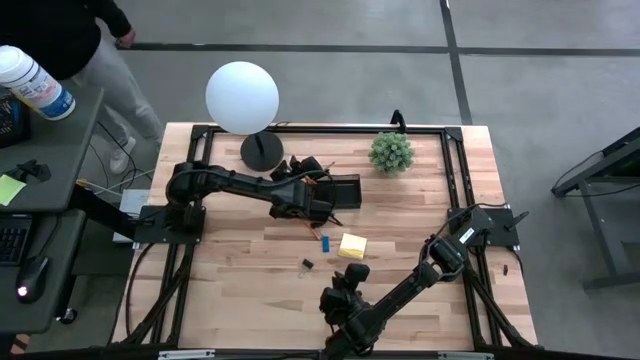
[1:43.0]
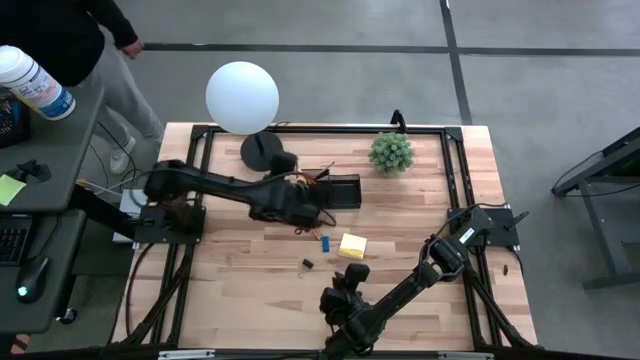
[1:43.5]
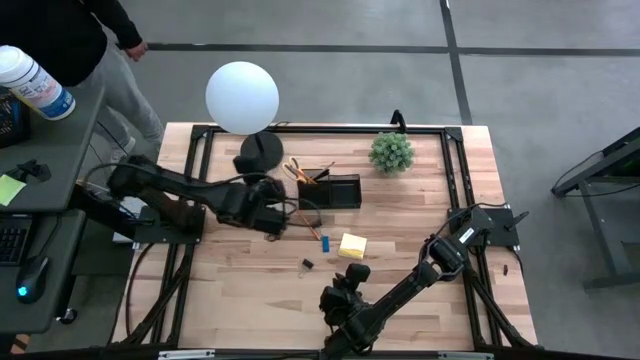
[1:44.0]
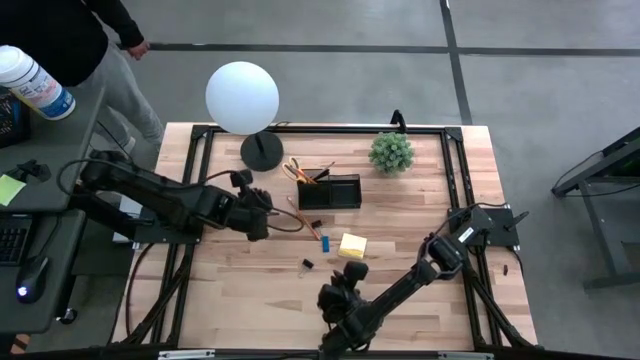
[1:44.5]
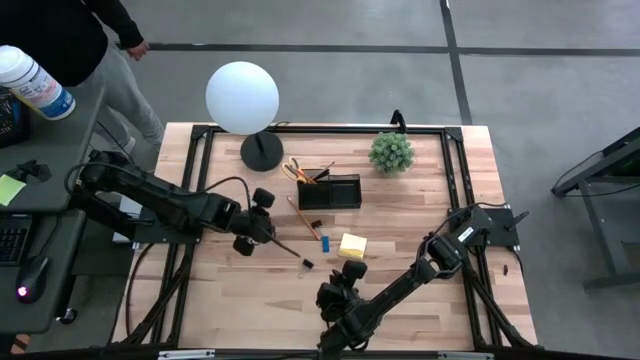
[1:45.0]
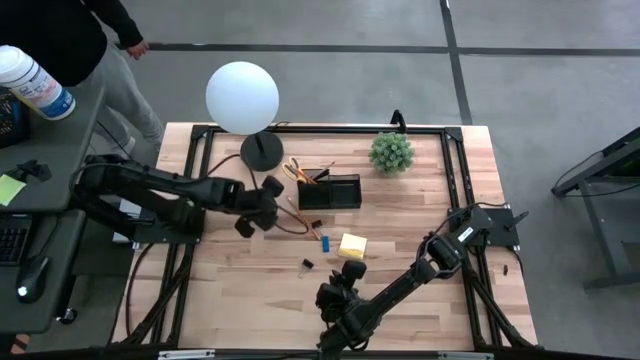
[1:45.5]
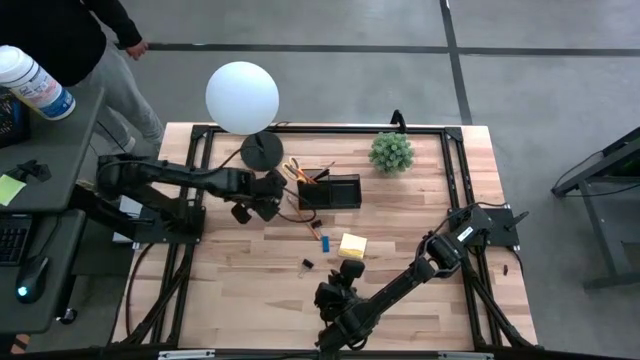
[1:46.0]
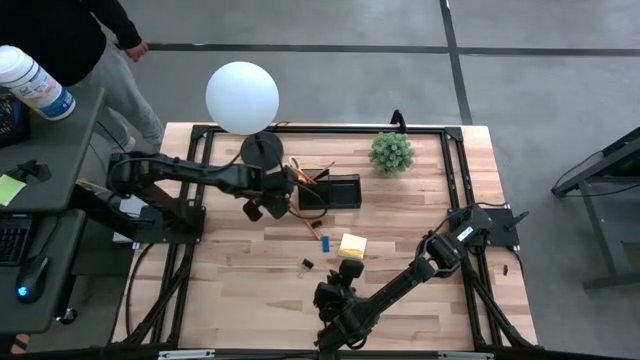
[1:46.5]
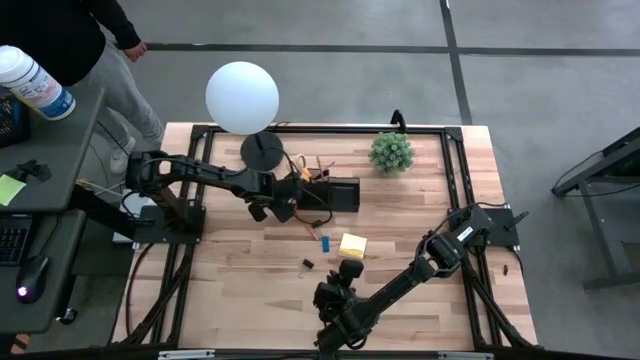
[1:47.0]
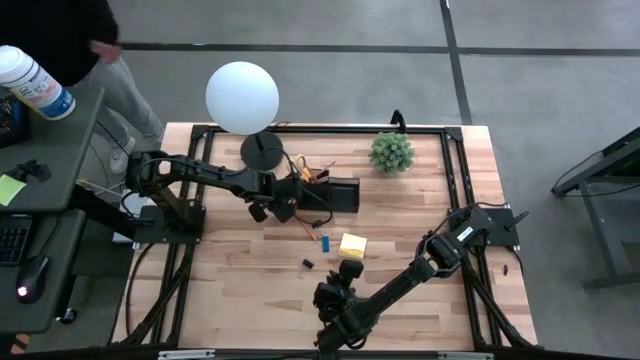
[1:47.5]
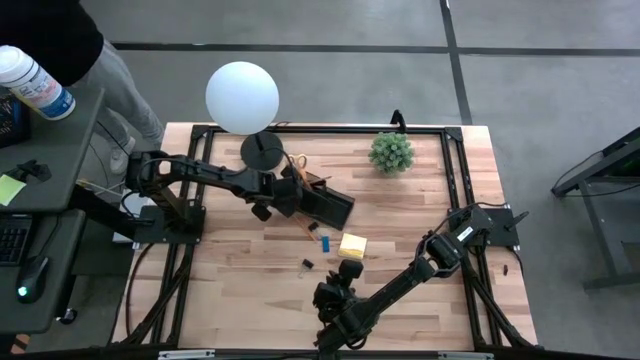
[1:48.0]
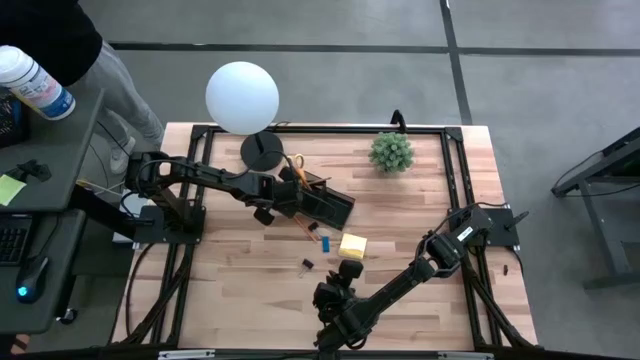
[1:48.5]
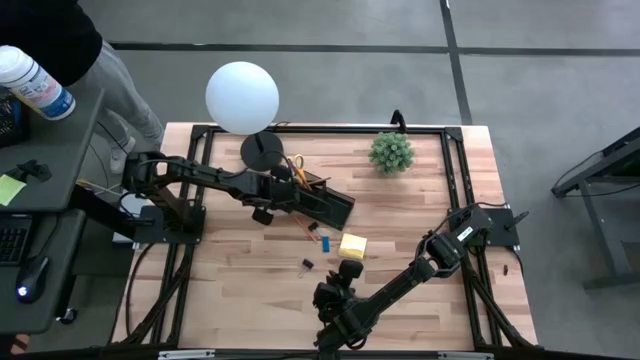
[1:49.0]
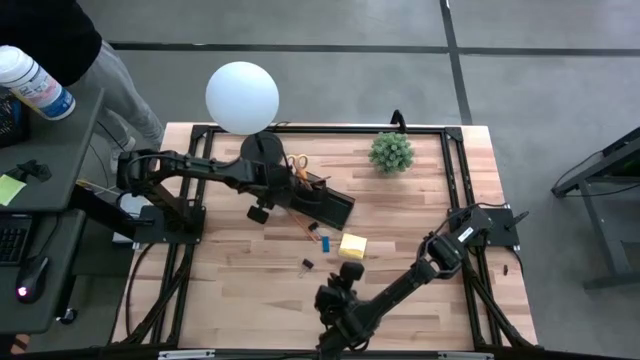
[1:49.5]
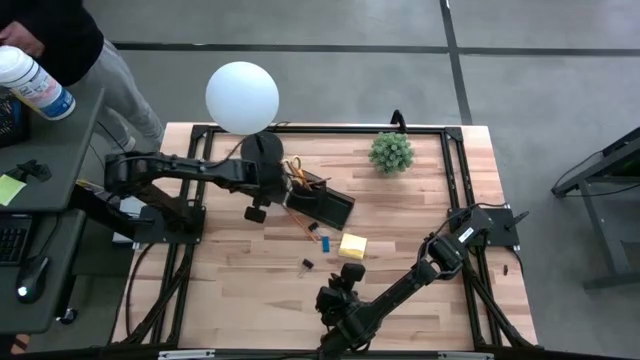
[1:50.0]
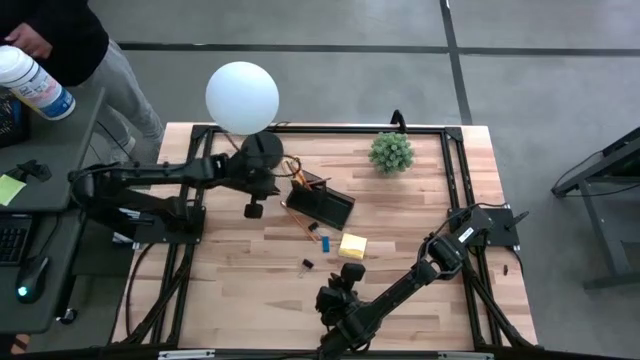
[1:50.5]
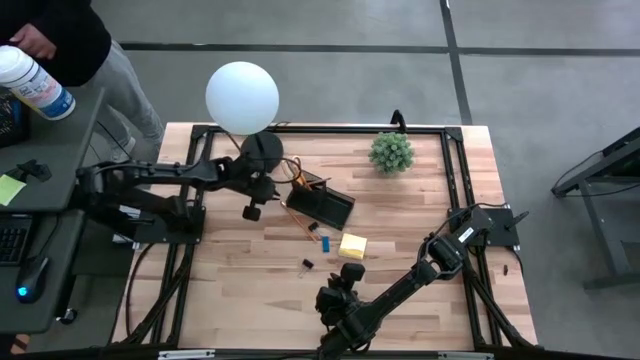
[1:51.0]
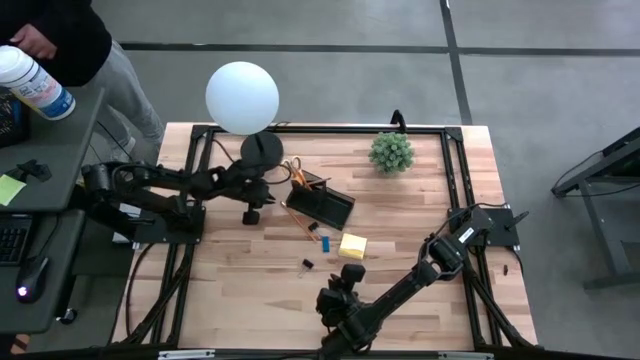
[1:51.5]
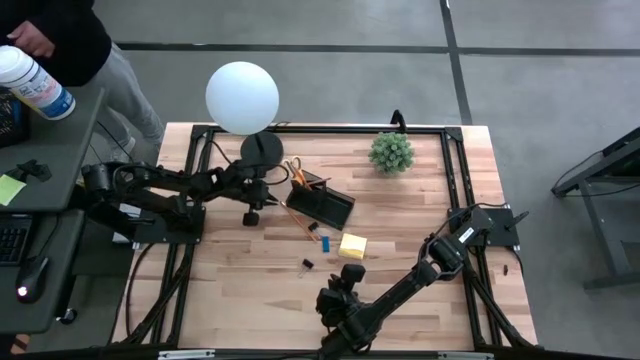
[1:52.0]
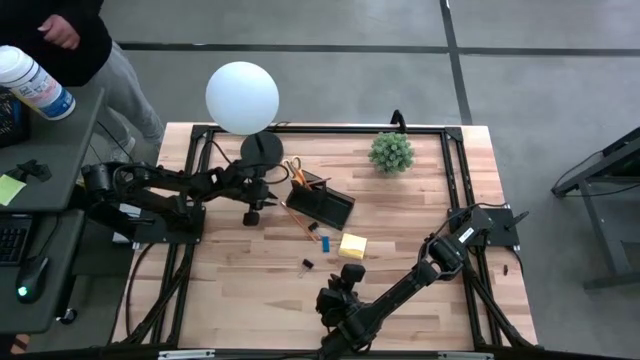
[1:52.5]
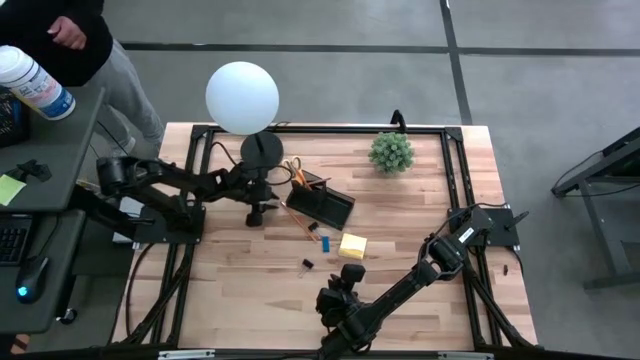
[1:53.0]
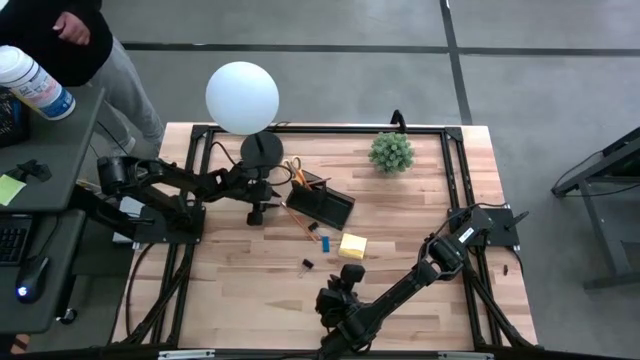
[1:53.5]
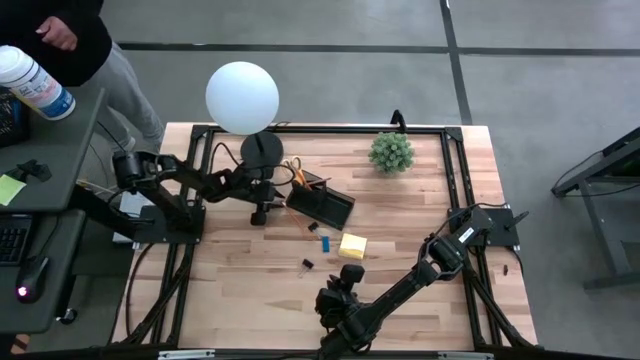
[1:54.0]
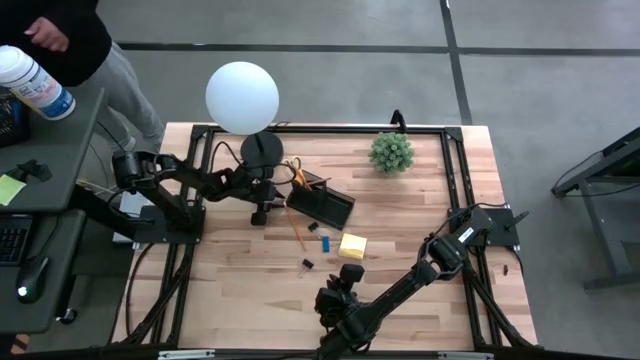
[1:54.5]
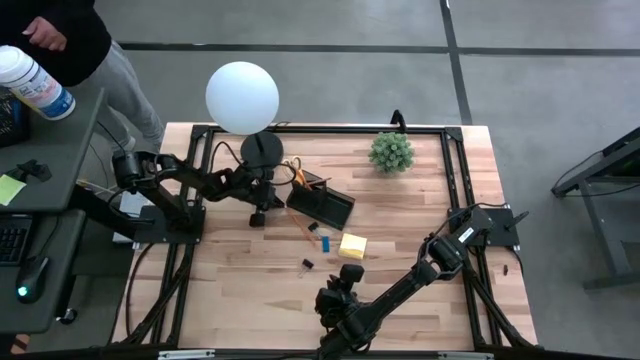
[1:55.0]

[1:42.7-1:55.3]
Task: Pick and place office supplies into organizer
Put the yellow pencil into the black organizer

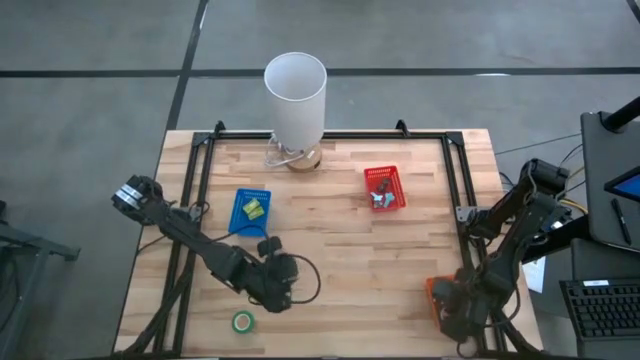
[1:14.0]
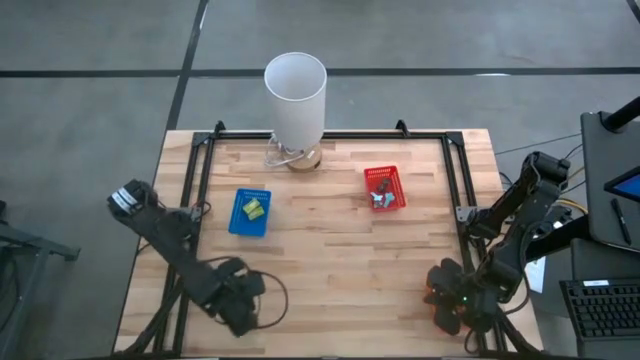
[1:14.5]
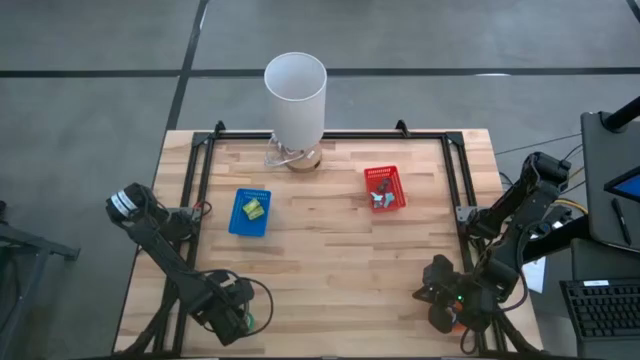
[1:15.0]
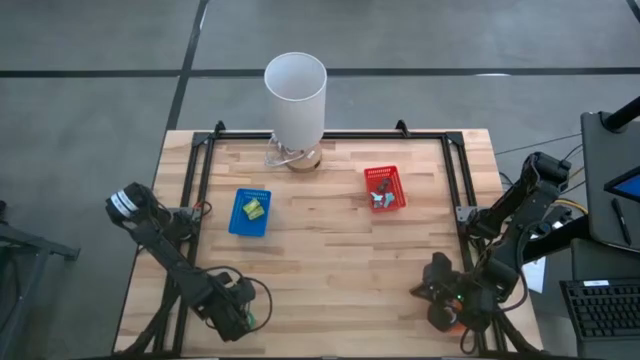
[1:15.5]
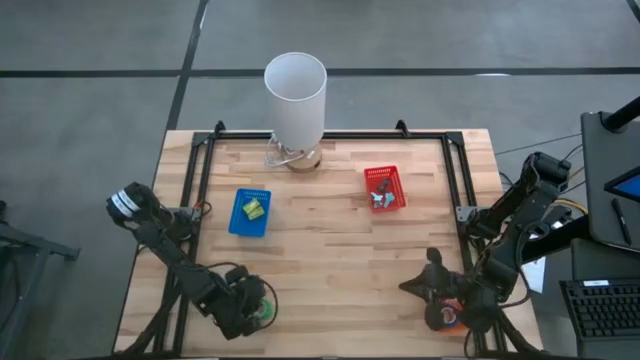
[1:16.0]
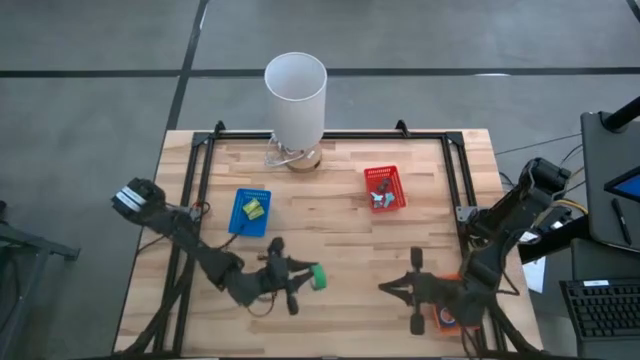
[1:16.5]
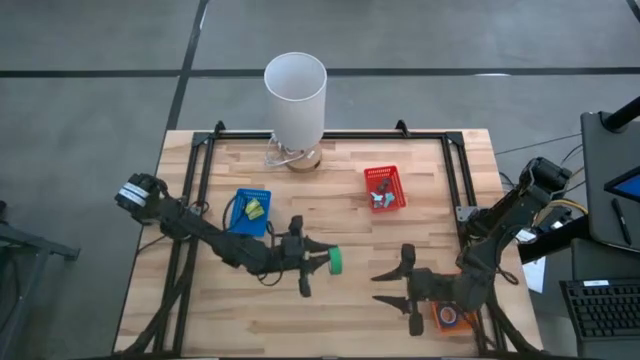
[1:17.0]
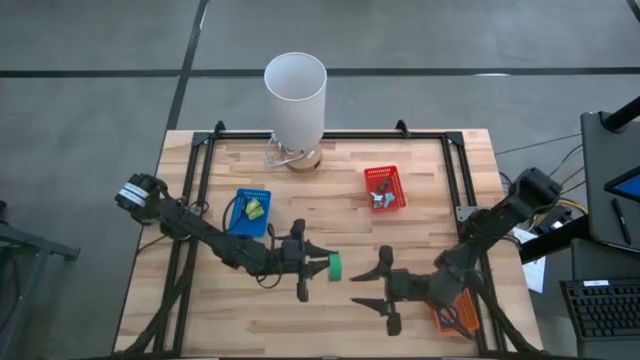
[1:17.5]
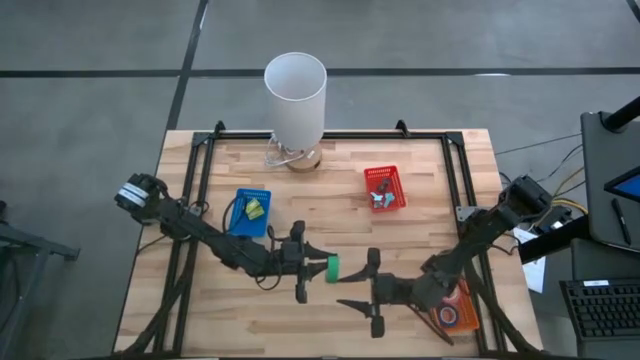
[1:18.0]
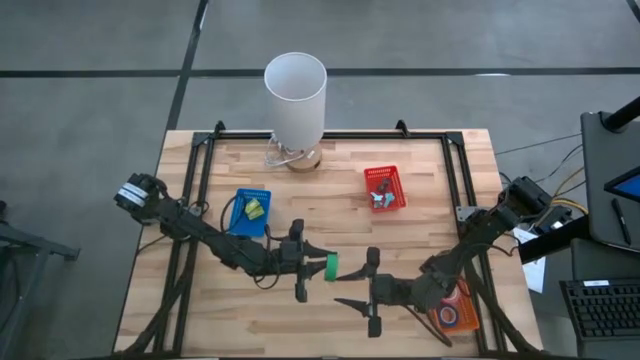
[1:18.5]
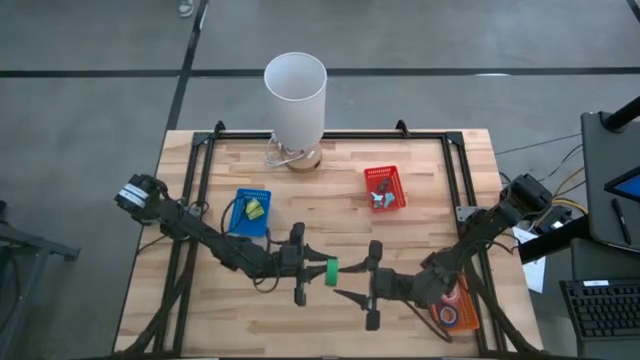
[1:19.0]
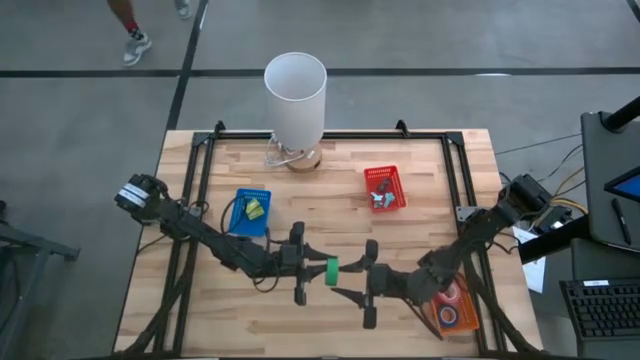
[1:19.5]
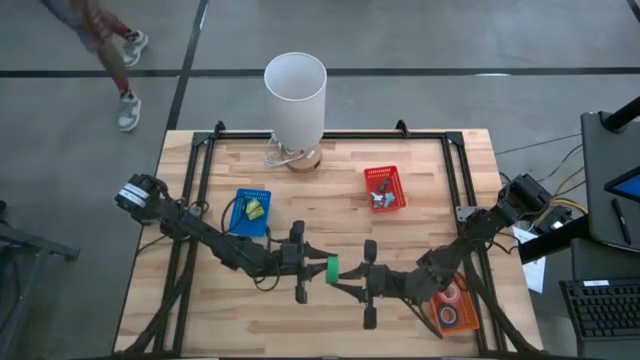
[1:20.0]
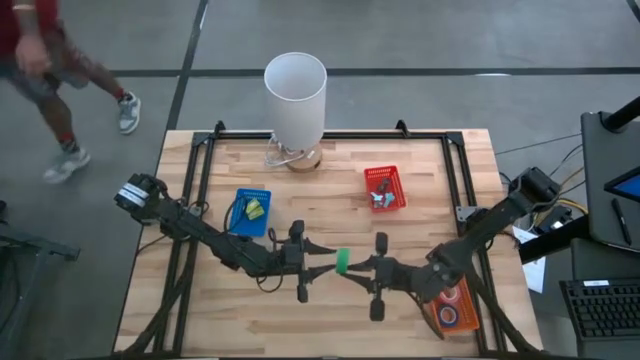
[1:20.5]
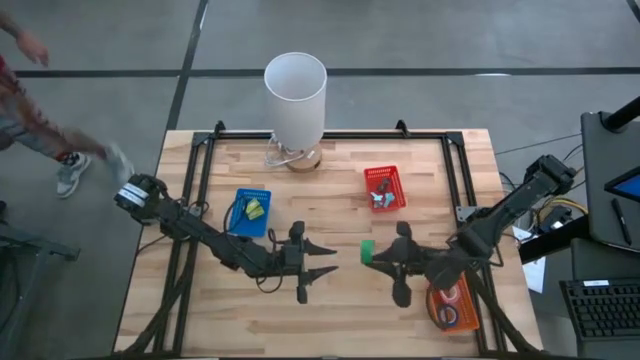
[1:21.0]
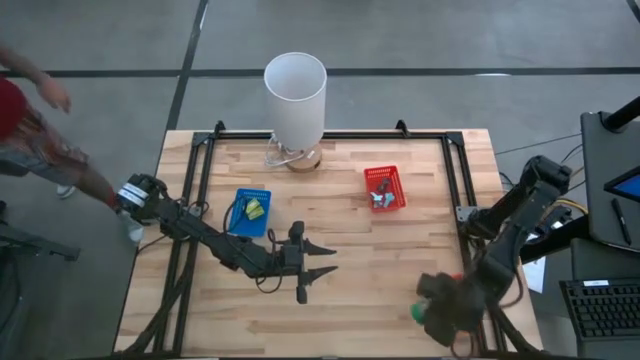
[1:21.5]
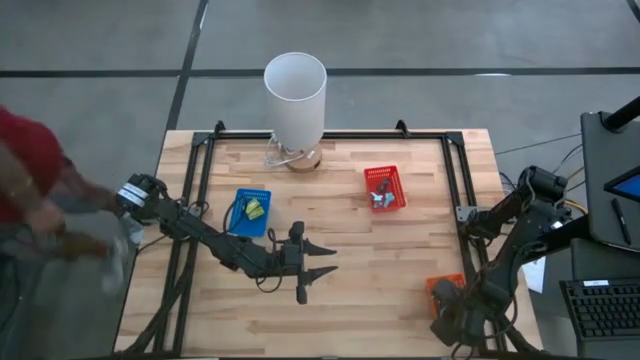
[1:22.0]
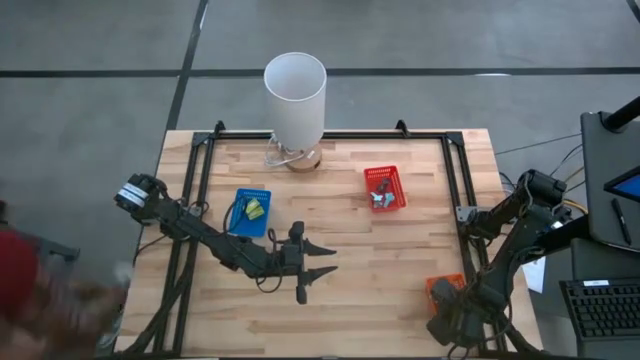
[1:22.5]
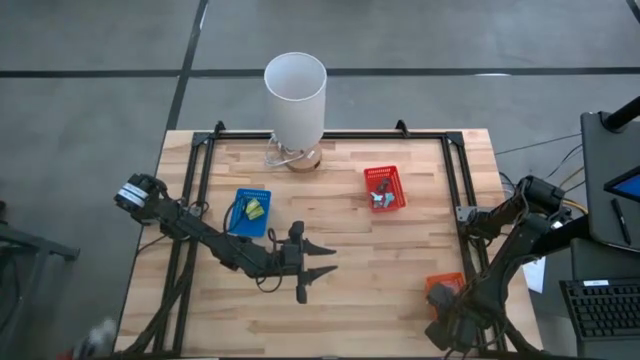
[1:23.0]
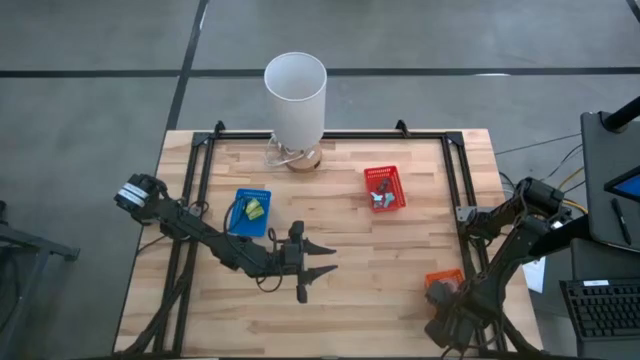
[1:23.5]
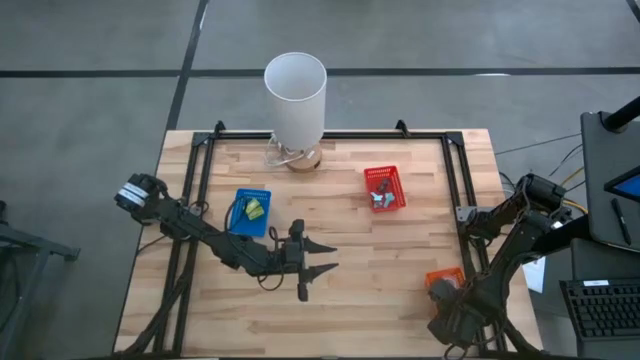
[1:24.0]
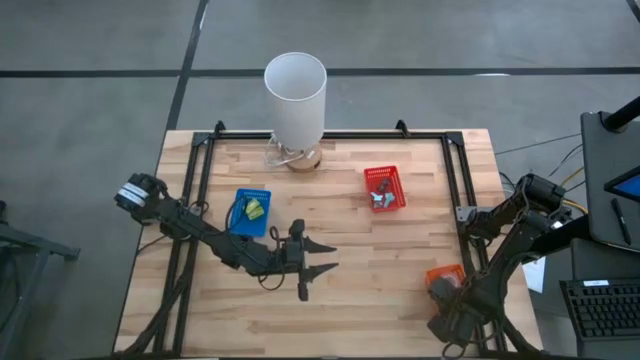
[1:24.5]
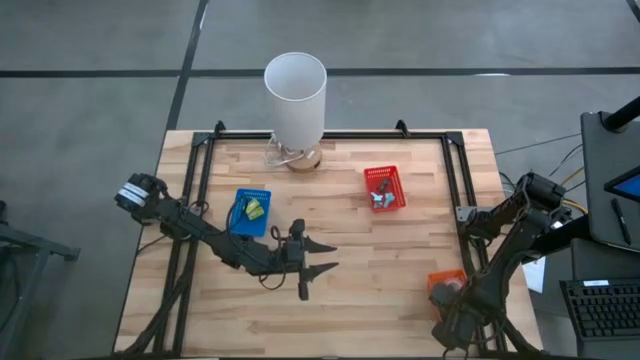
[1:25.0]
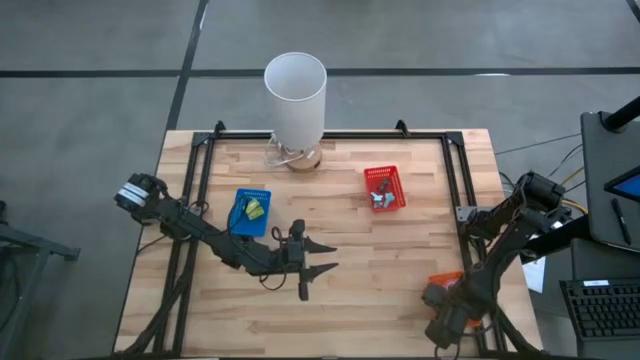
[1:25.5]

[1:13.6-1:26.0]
Task: Pick and place Stapler, Stapler remover, tape
Put the green tape into the orange basket
